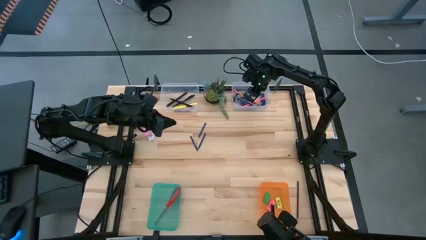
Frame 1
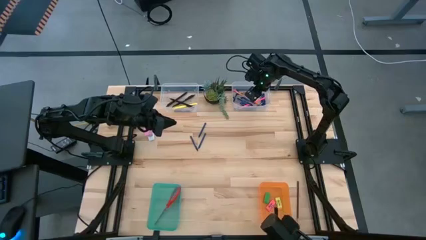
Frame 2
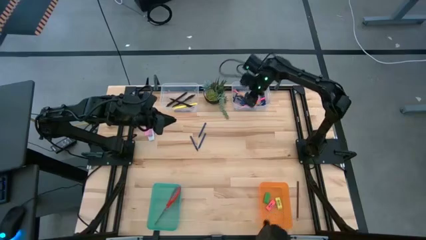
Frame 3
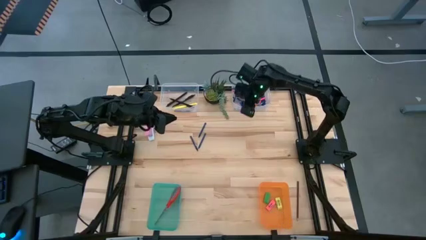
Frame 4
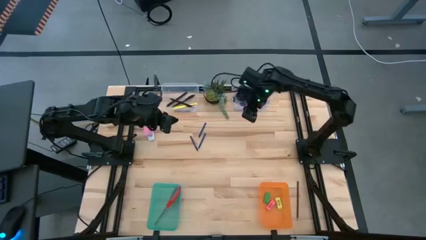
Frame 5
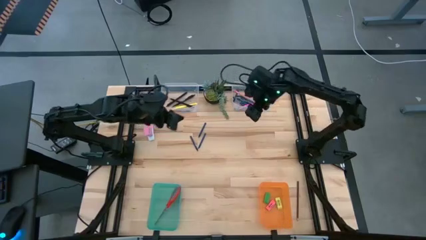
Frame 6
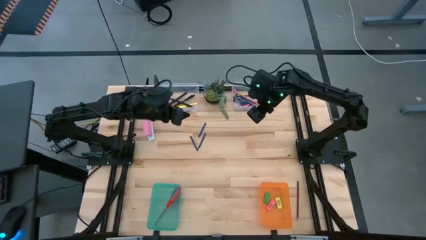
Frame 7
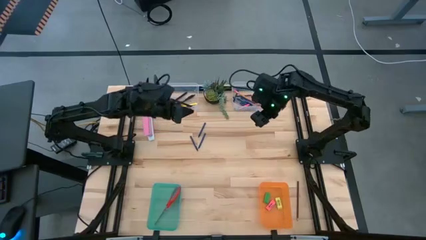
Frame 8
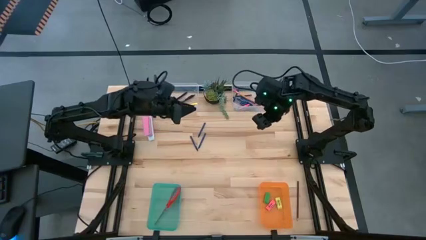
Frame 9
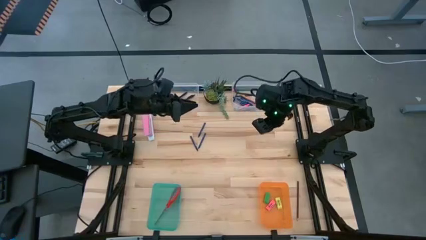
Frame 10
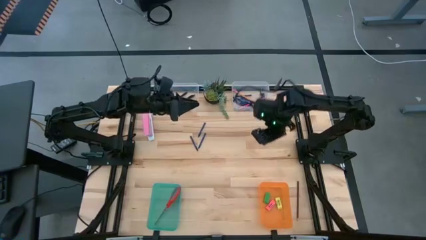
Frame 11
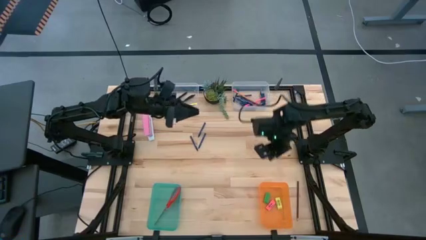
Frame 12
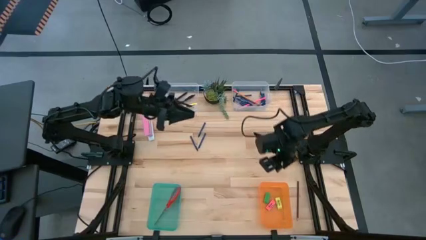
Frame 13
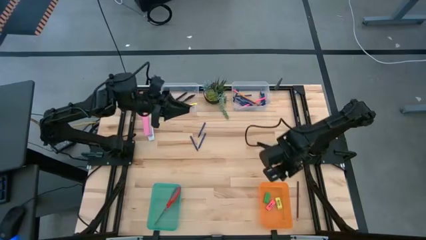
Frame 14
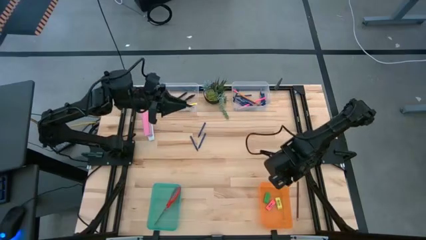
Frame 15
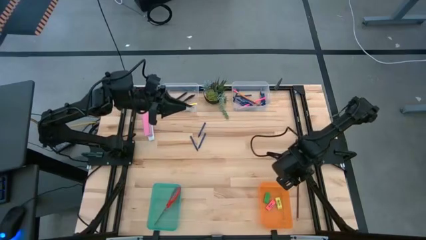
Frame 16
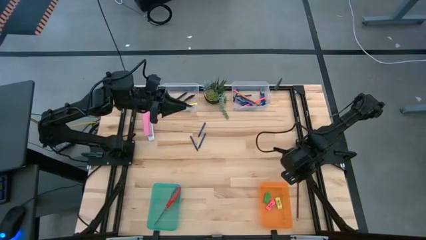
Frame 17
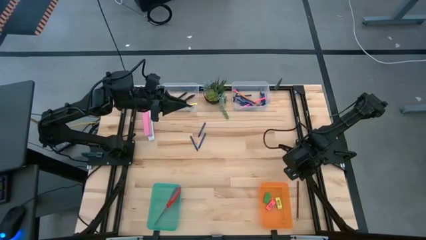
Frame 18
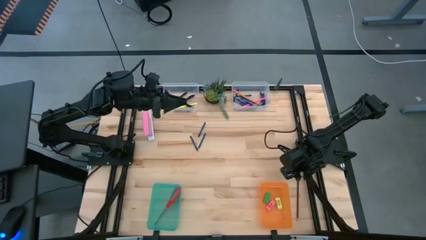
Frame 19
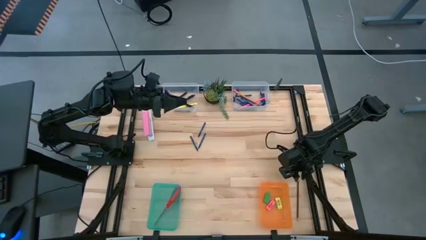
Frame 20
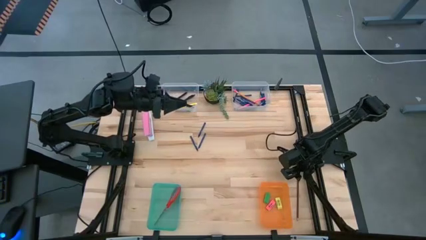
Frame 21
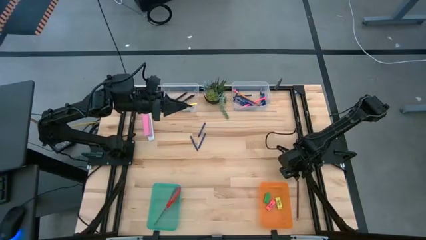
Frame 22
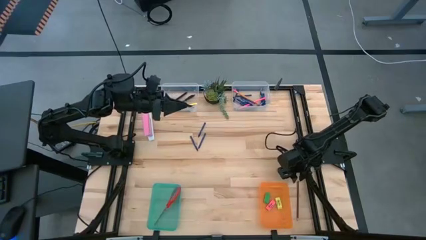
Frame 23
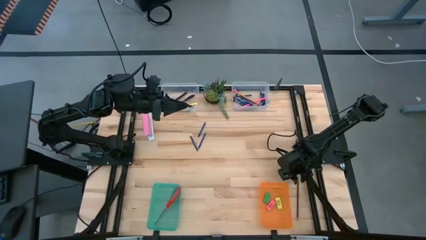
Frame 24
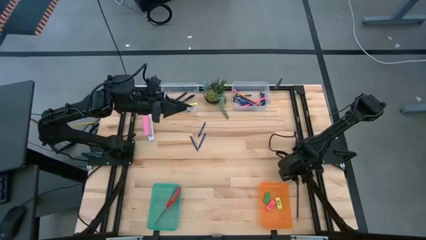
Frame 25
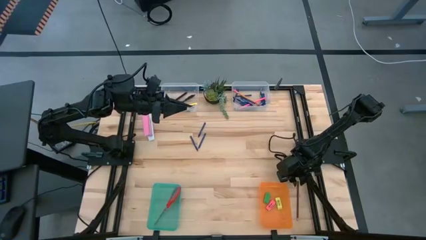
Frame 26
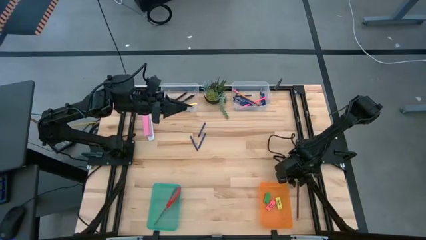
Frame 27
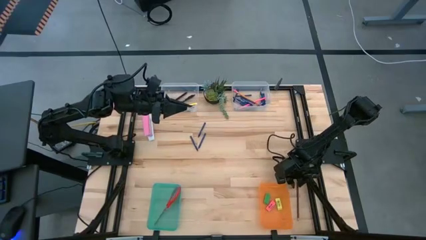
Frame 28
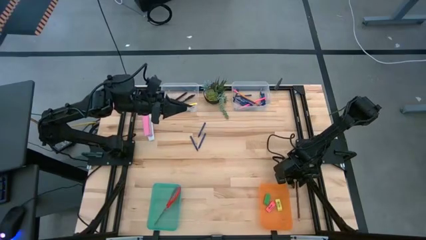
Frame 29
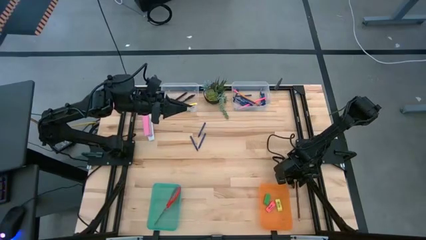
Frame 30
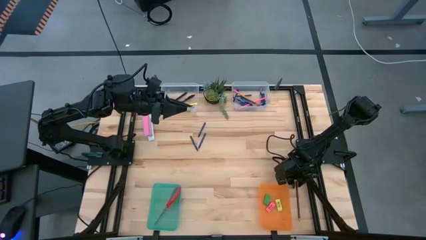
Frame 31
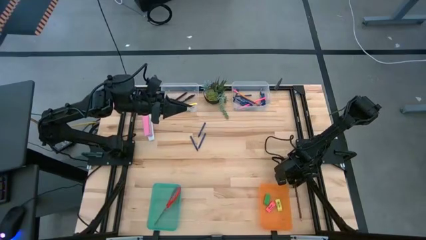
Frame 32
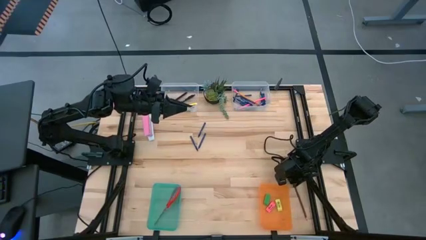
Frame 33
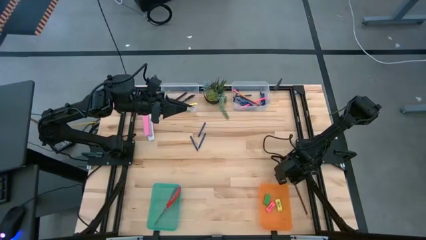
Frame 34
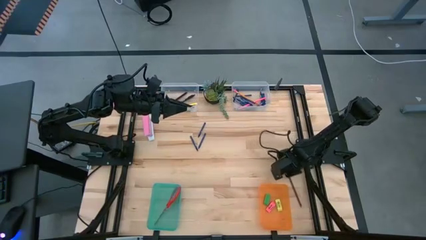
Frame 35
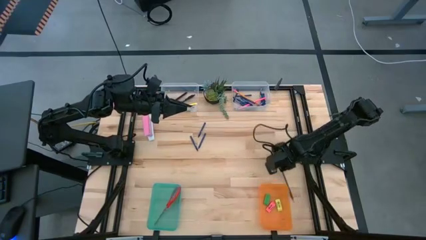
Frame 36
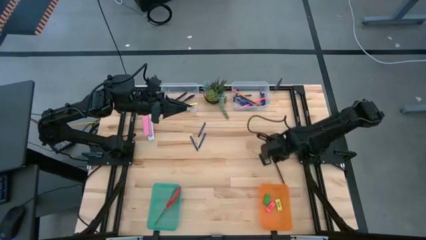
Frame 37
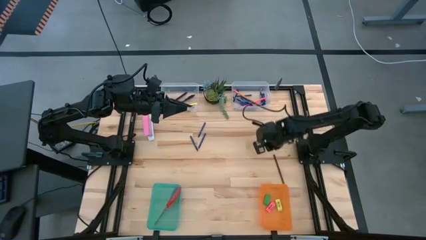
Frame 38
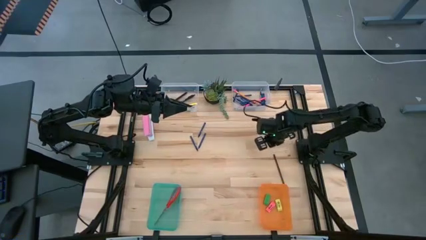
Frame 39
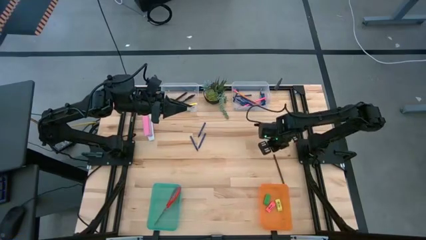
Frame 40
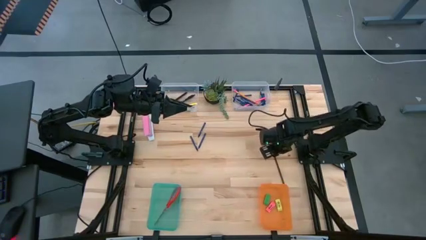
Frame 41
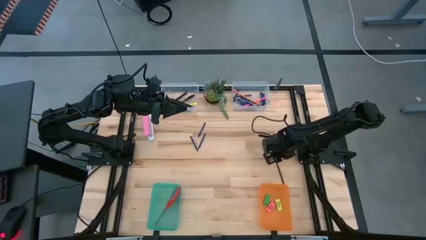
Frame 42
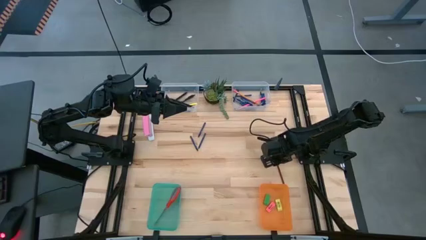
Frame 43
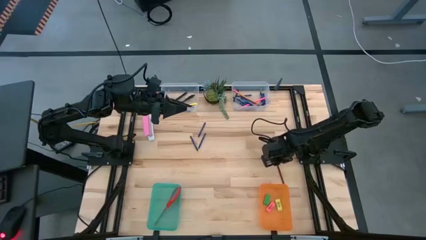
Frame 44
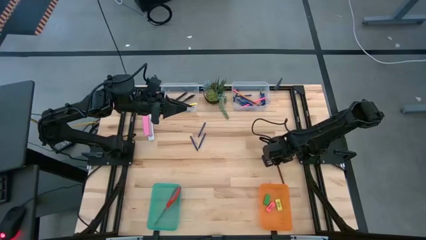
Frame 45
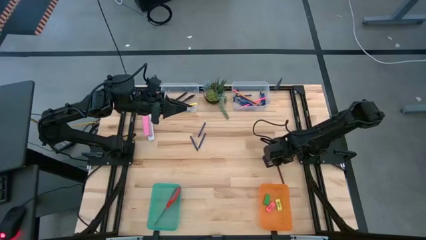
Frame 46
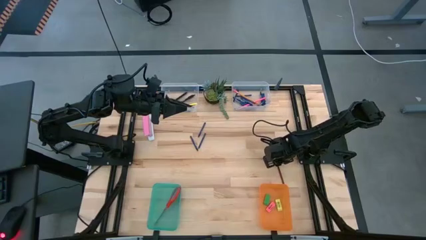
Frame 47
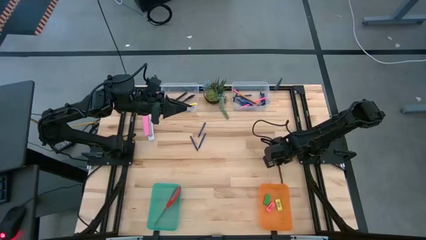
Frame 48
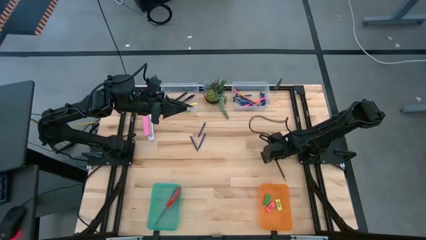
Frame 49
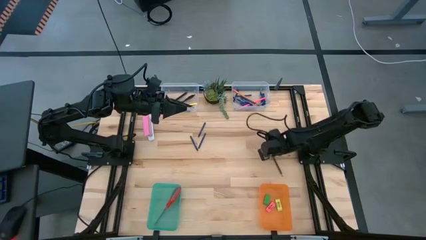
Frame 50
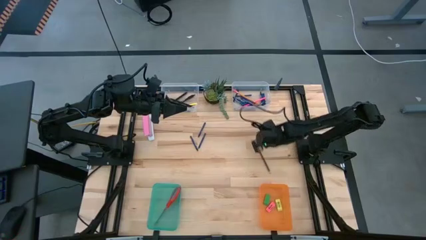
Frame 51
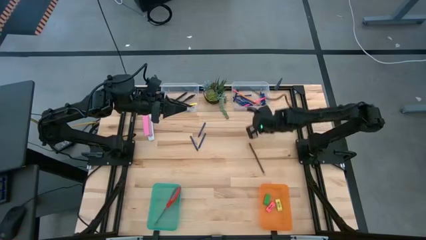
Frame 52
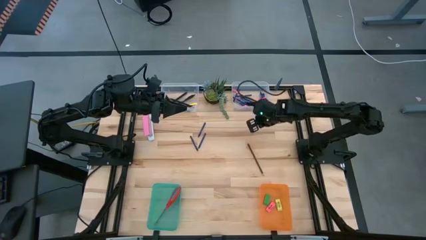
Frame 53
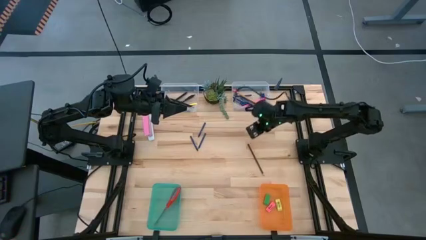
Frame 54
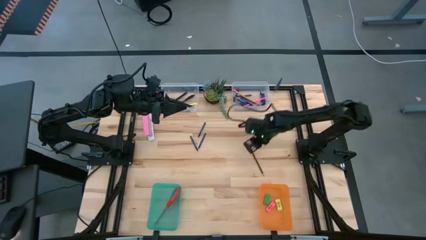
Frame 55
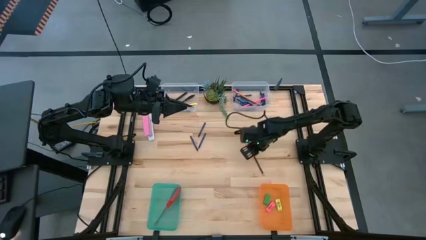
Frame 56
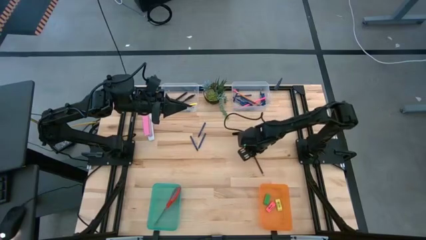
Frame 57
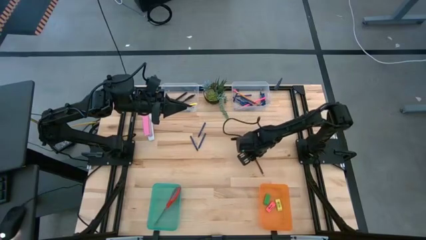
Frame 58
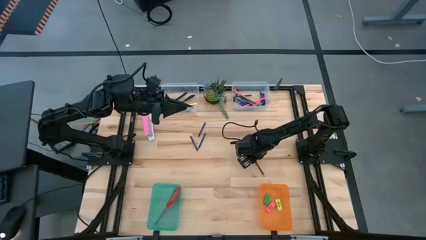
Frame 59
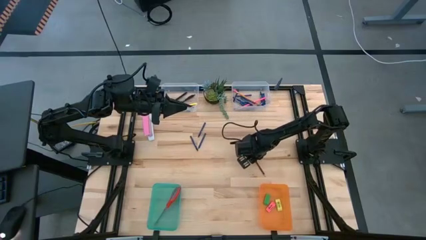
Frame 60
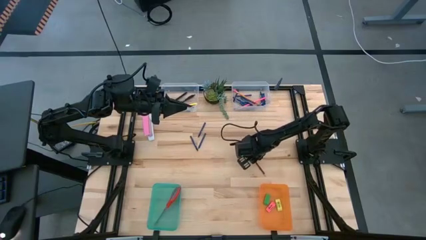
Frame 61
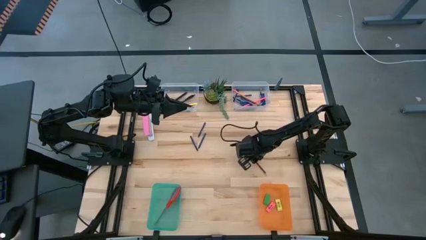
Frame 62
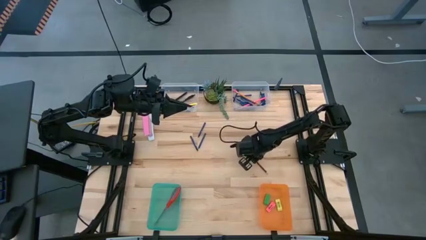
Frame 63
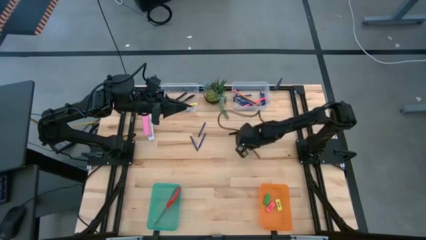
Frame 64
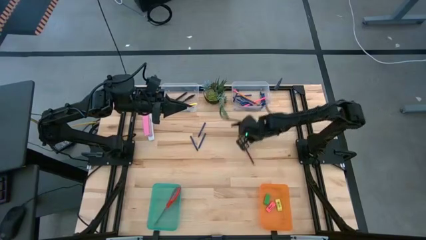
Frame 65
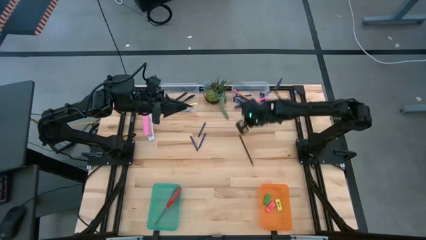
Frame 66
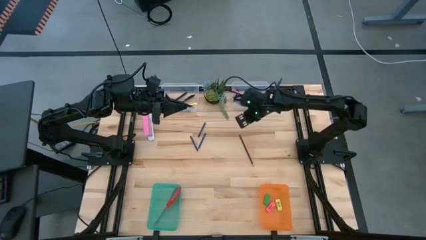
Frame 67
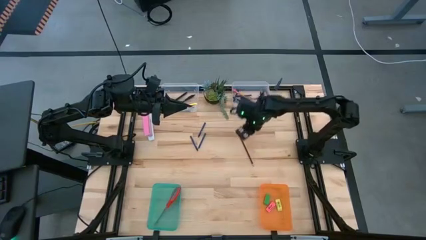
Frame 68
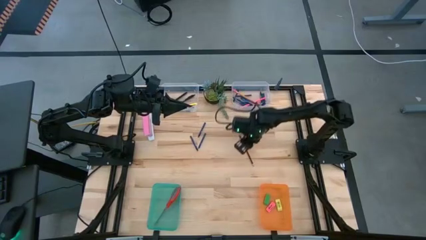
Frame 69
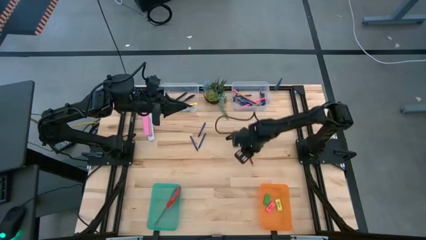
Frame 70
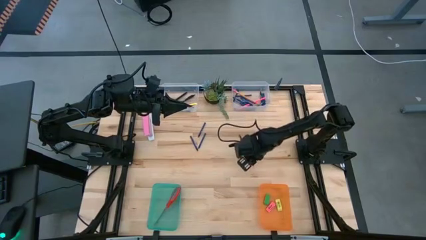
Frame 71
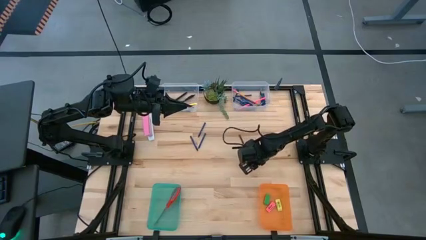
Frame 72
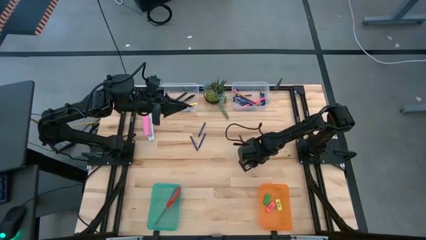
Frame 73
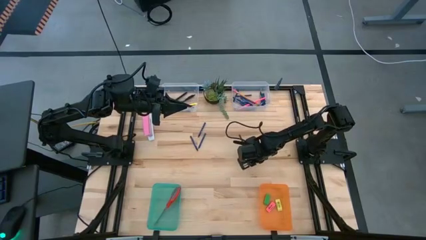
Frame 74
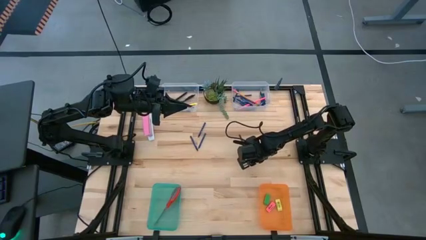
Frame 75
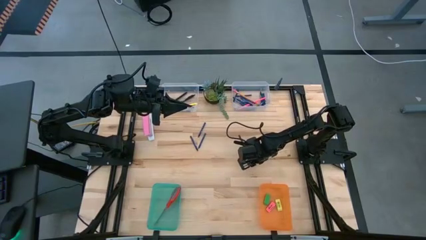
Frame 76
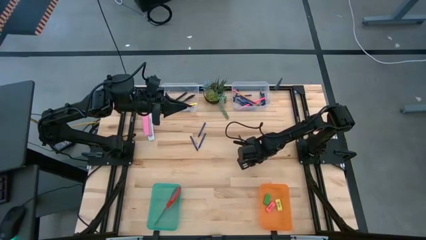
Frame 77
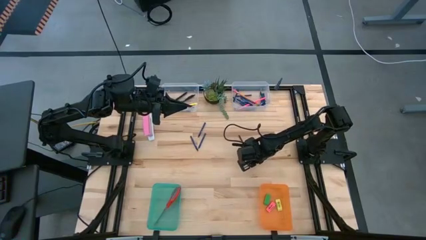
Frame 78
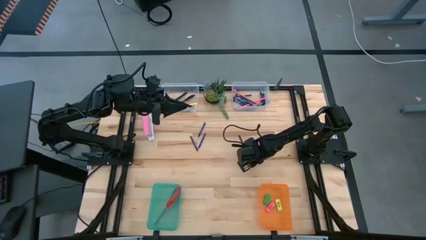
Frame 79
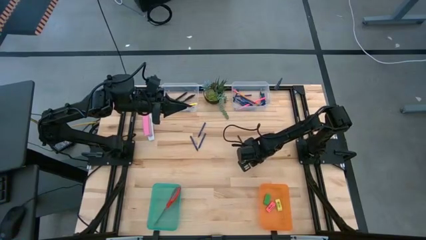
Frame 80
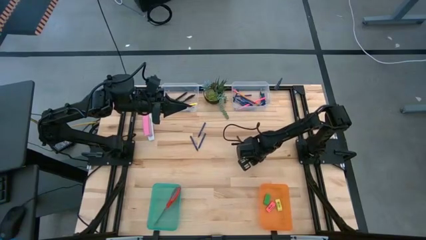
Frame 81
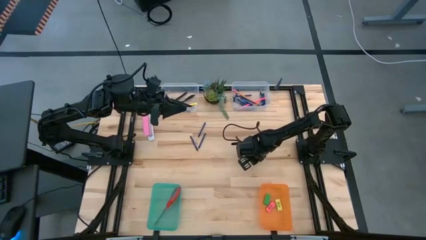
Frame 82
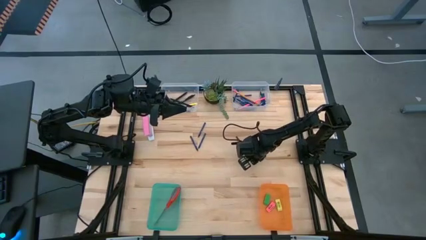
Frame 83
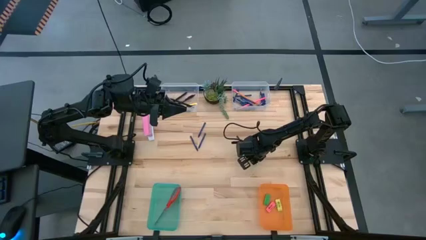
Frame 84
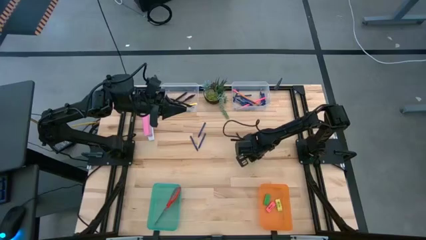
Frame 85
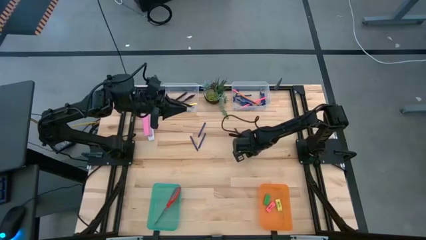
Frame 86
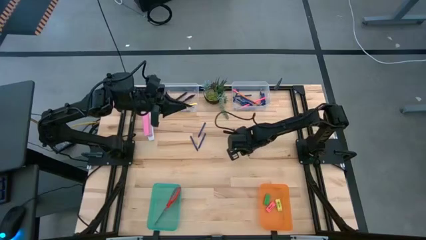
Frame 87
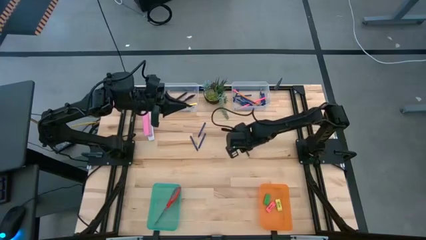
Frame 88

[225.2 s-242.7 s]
Task: Sort crayons/erasers/pens/pencils in bins
Put the brown pencil into the right transparent bin
